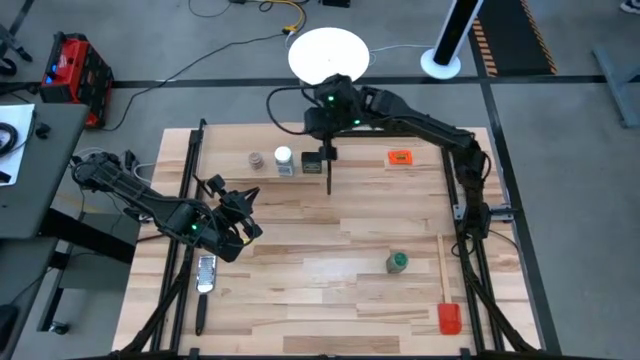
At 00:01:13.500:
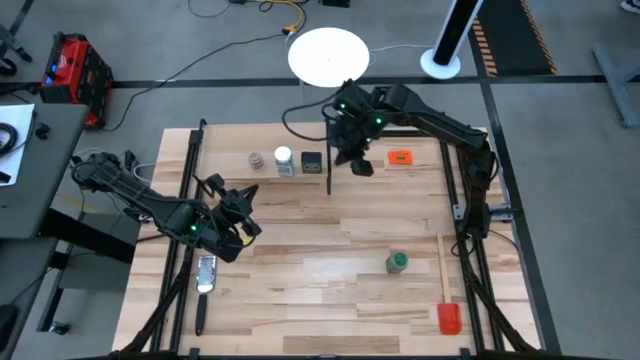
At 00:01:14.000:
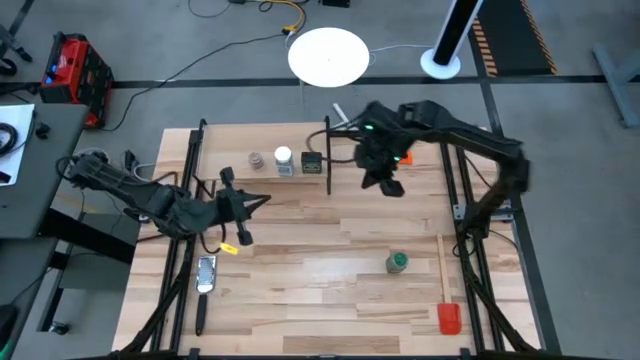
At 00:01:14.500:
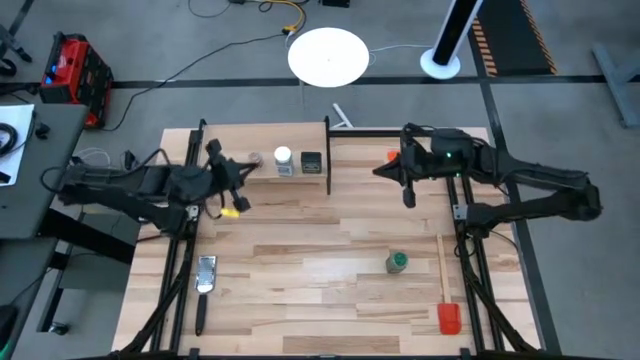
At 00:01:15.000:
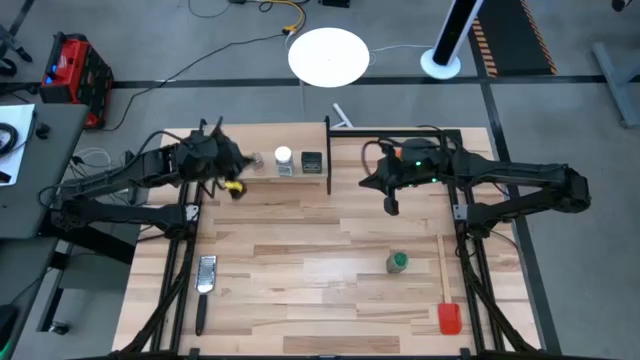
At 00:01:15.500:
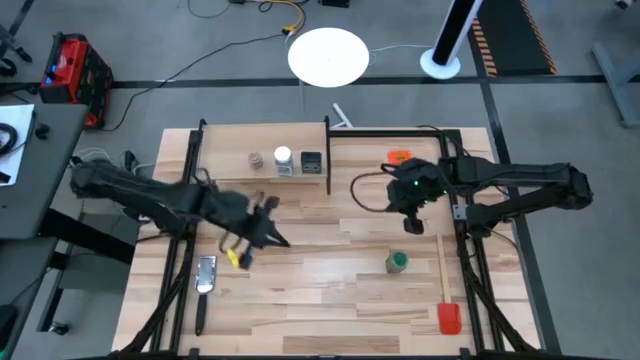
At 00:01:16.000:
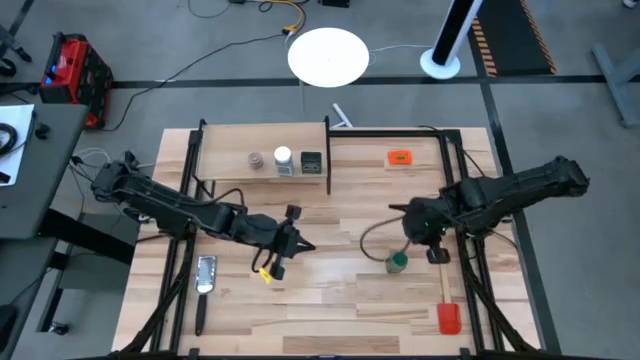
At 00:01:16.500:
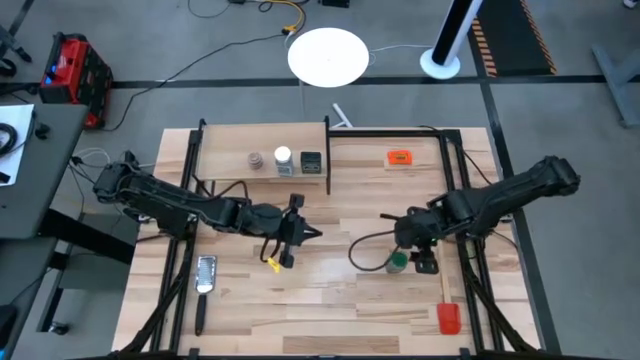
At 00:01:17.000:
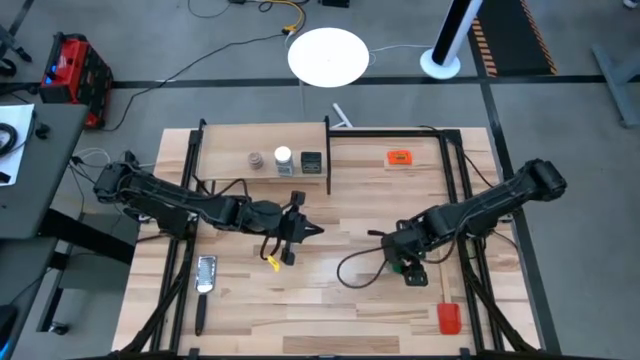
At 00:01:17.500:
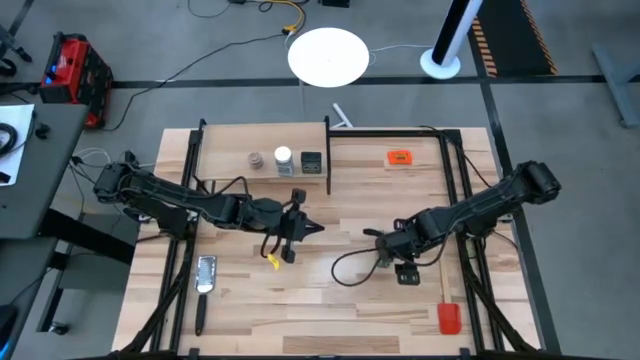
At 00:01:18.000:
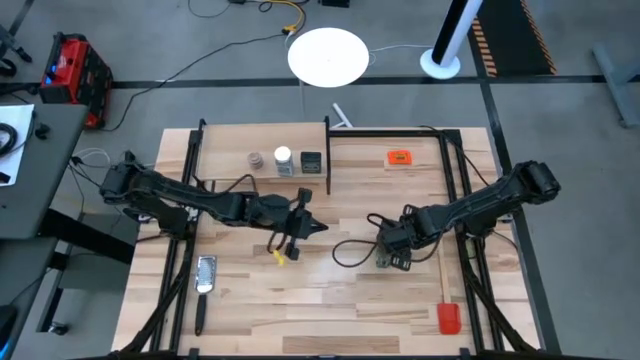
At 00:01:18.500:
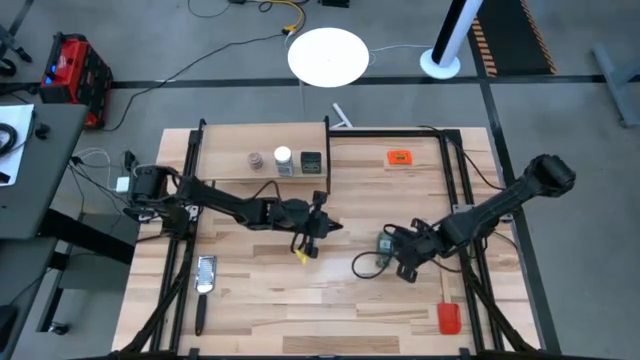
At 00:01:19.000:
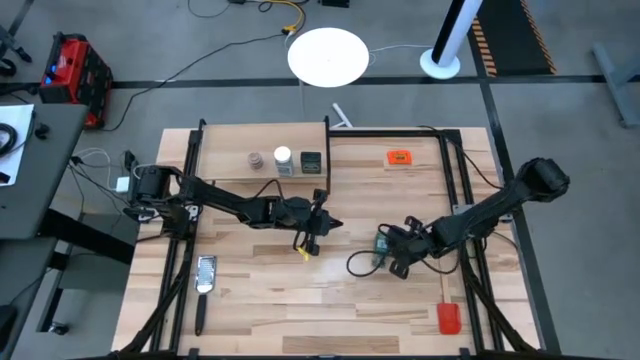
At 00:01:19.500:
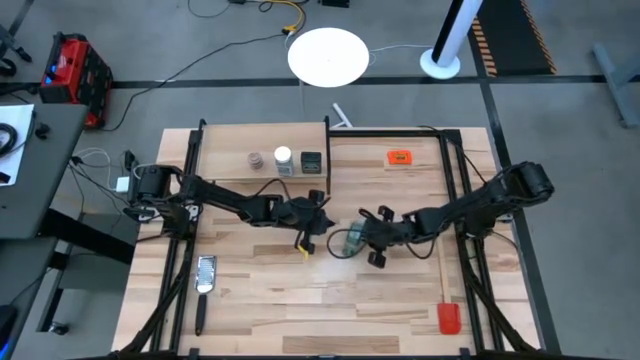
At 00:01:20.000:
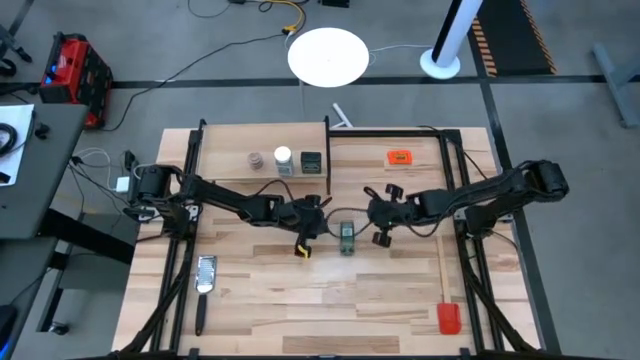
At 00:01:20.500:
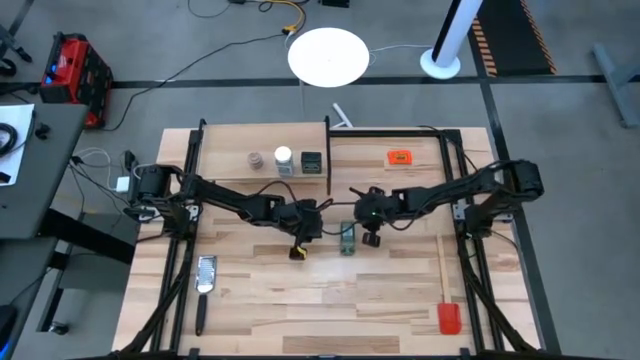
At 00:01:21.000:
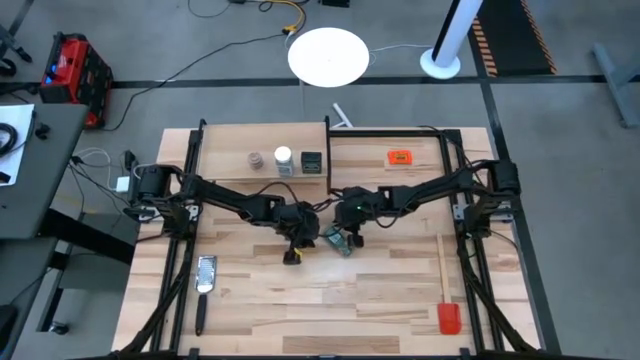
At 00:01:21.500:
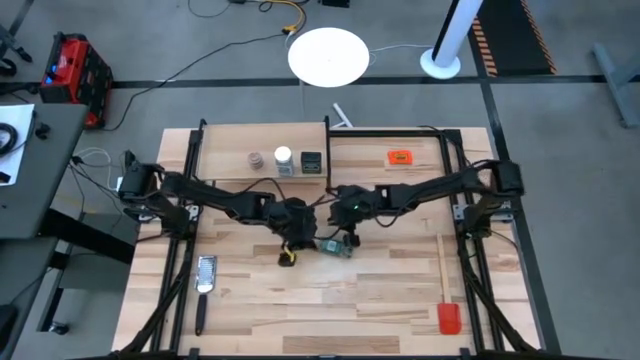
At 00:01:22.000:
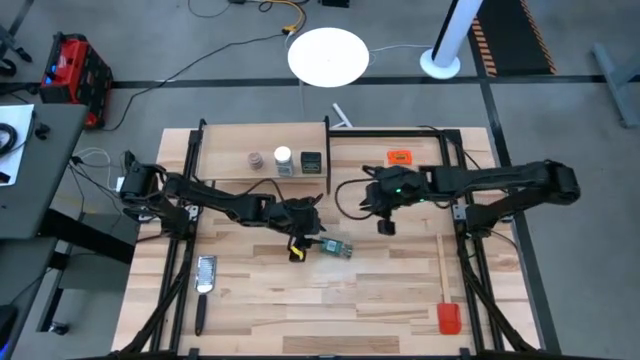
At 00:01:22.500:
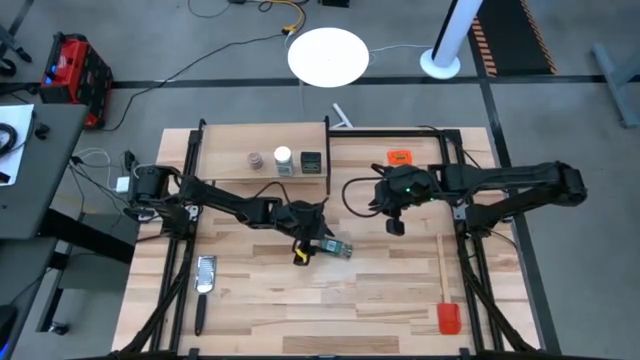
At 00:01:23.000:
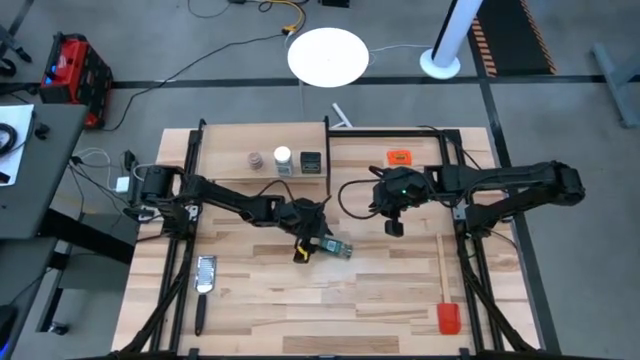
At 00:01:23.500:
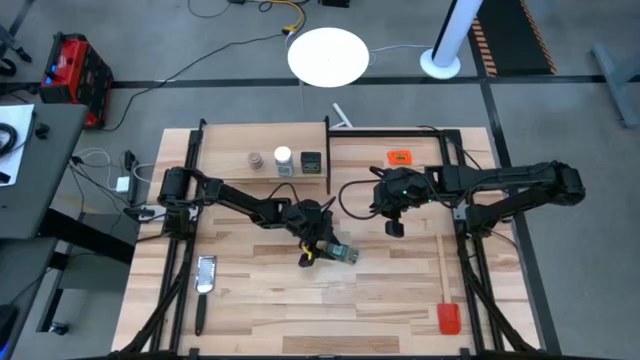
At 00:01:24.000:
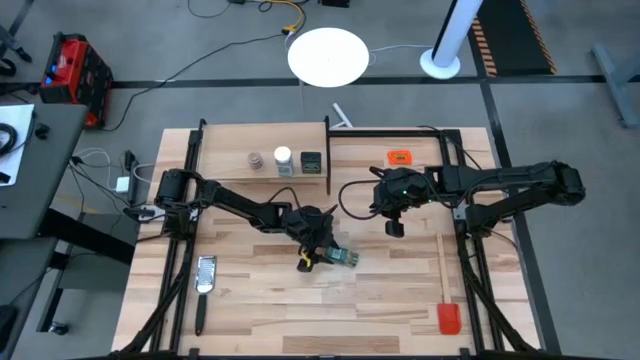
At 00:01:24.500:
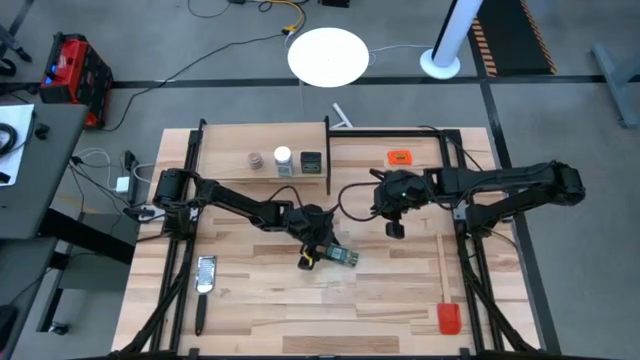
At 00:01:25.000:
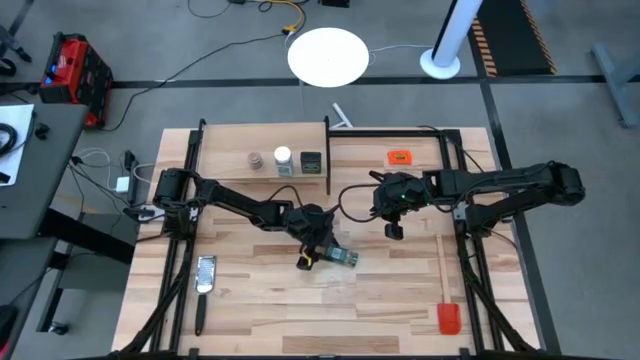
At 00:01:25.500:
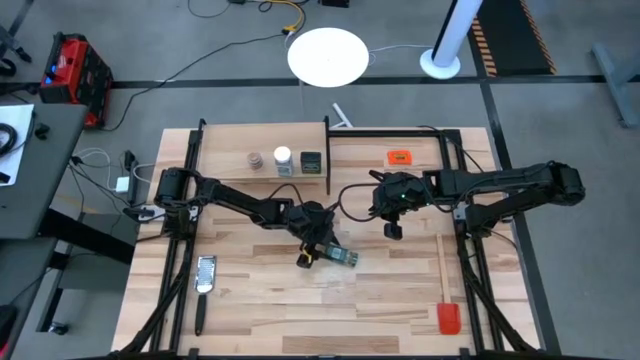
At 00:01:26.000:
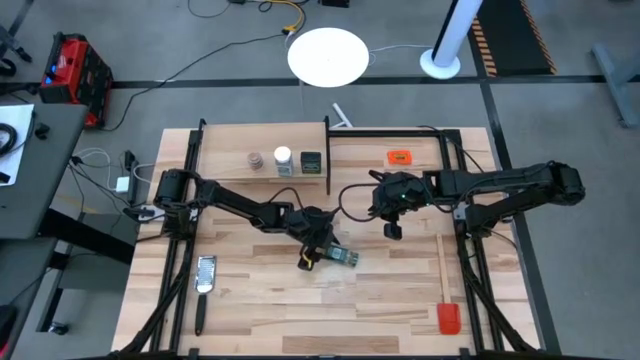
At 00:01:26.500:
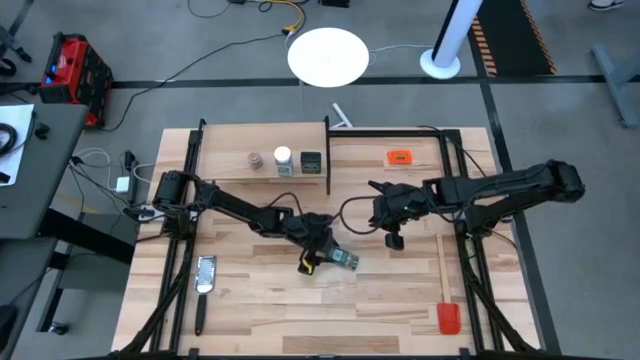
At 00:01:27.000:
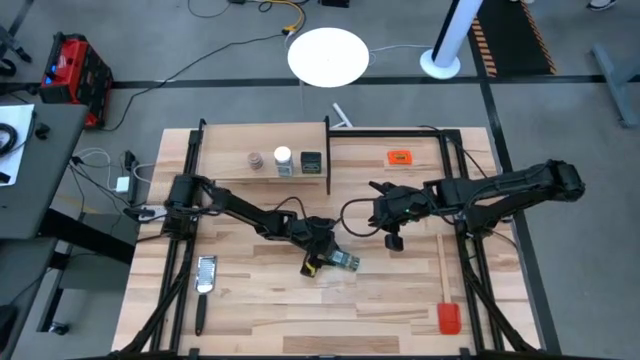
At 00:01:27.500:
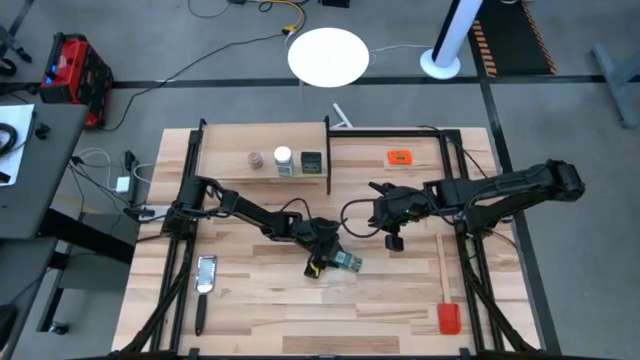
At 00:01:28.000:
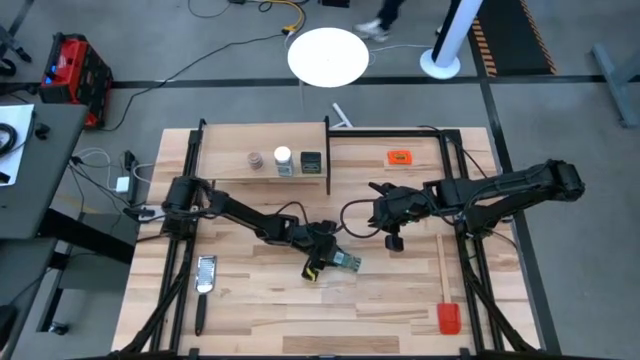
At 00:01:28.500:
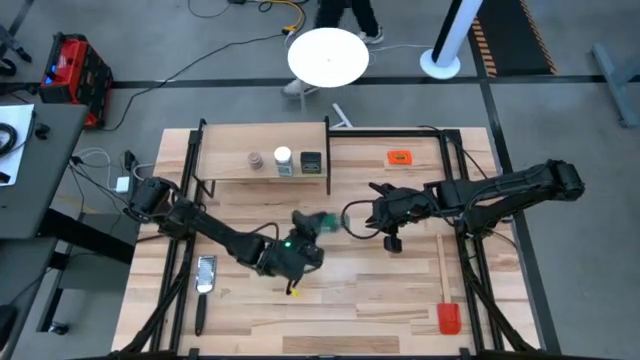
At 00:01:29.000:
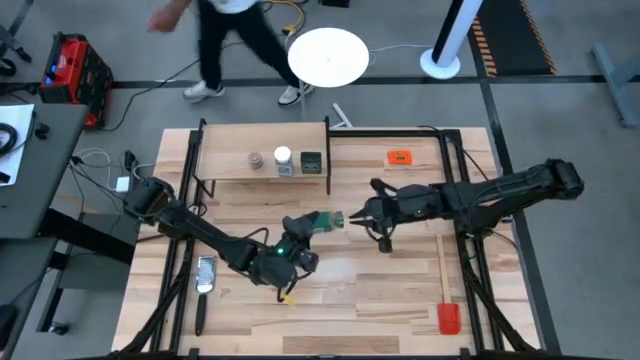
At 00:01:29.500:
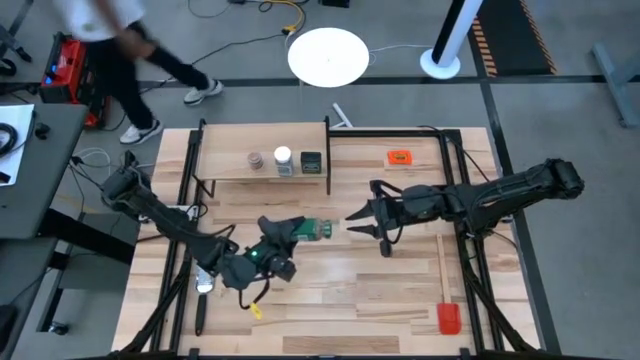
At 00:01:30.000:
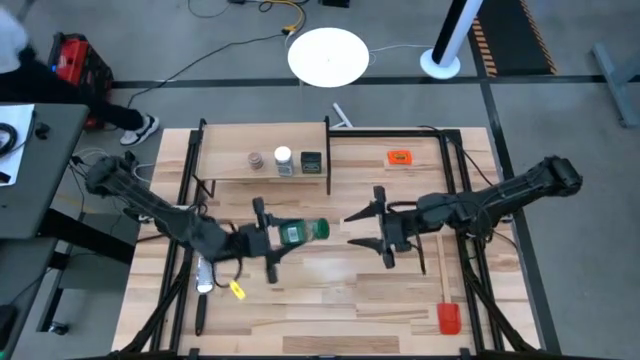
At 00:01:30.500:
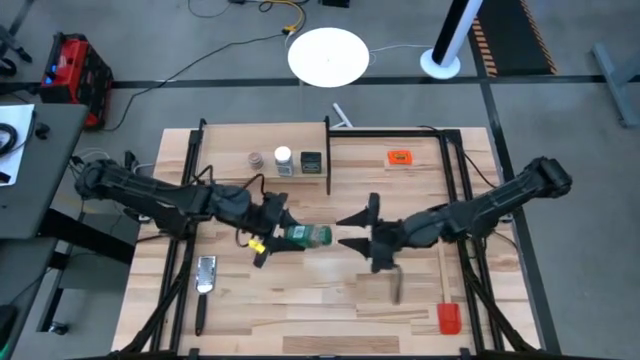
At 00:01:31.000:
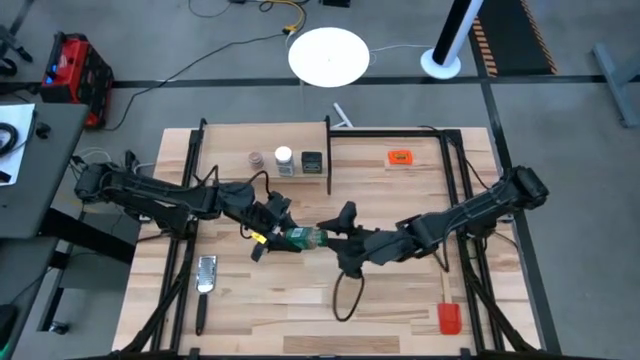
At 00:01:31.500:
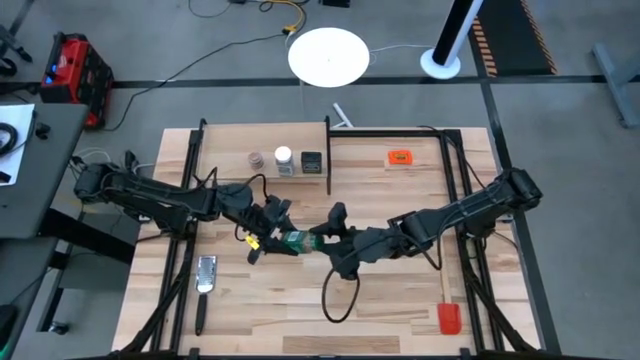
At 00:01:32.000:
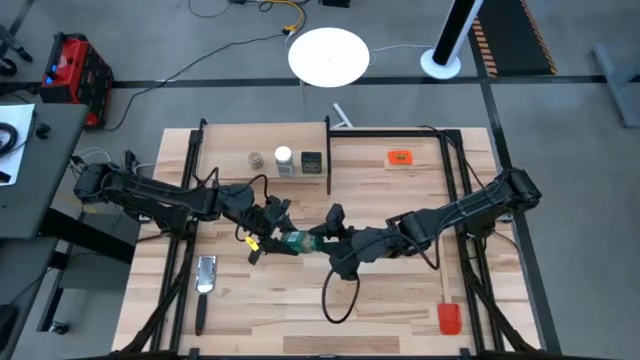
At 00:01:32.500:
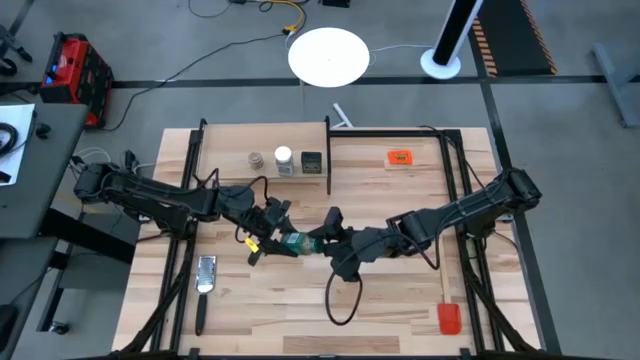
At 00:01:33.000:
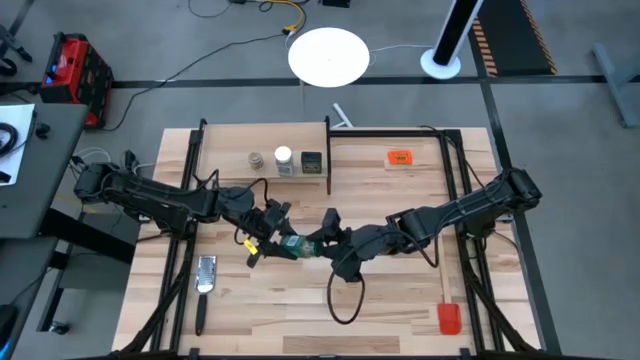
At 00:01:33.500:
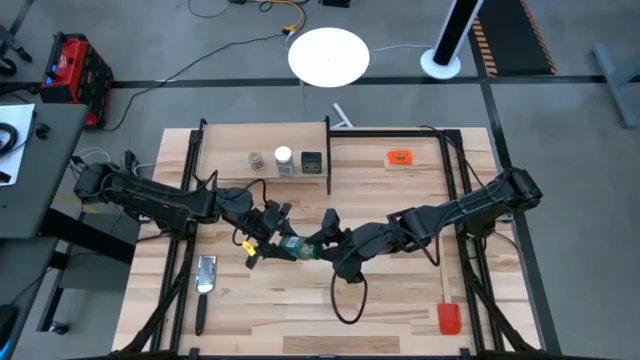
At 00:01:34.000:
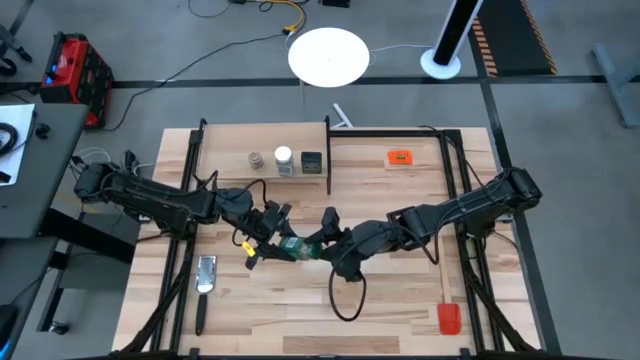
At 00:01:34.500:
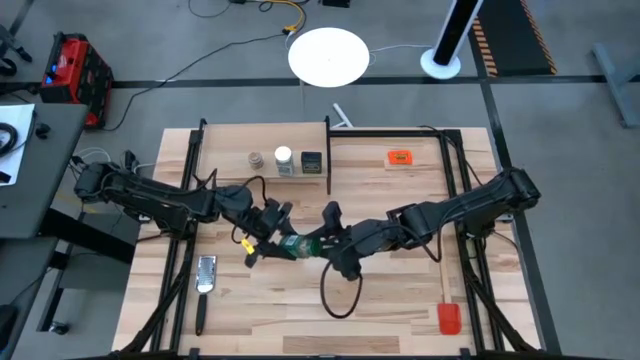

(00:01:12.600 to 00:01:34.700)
Task: Shelf spices
Put the green seasoning bottle on the shelf

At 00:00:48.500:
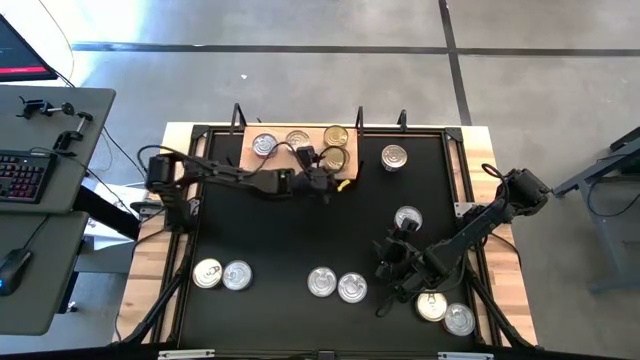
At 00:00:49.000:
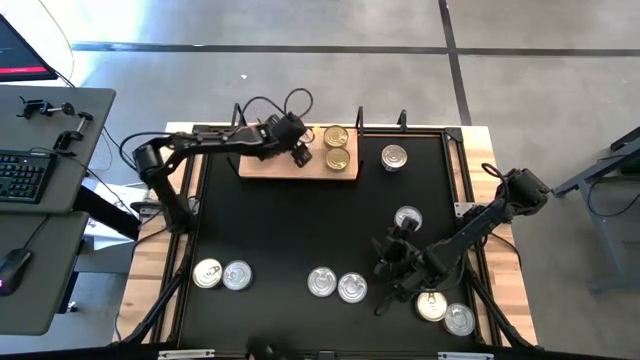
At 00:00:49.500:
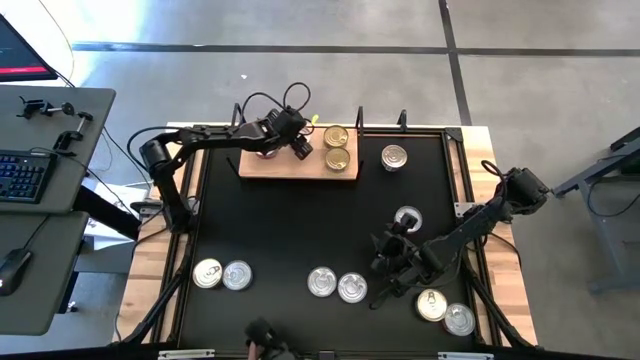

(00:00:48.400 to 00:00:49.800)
Task: Stack canned seafood by type on shelf
Adjust the blue and pink tuna can on the shelf
